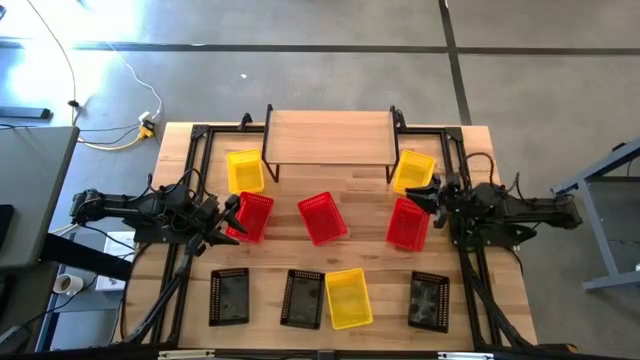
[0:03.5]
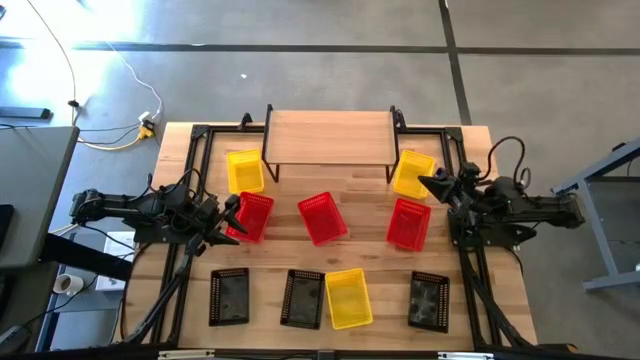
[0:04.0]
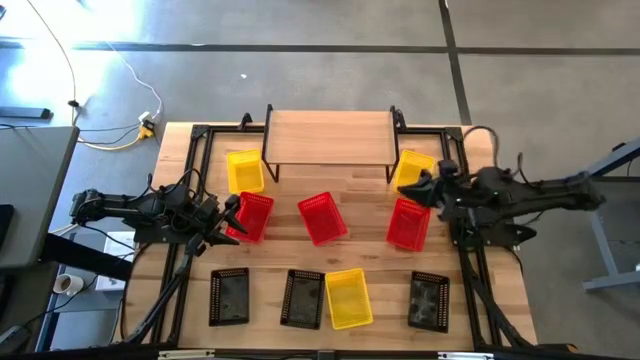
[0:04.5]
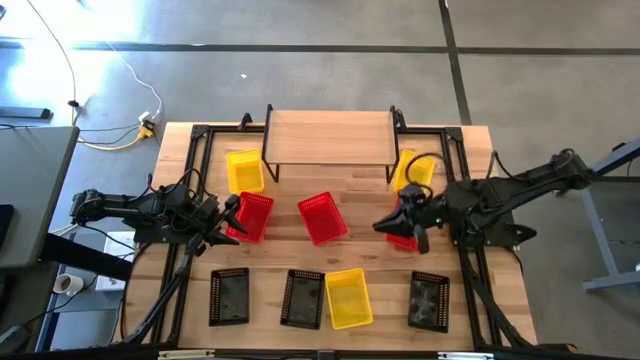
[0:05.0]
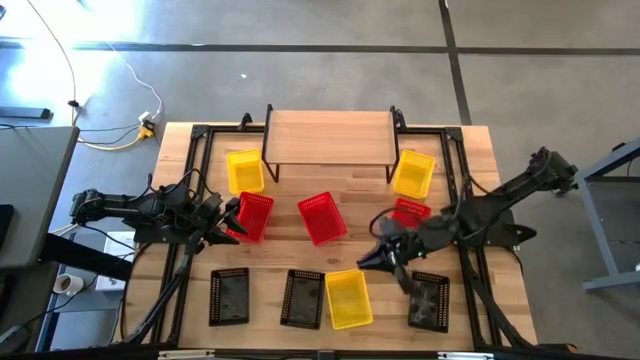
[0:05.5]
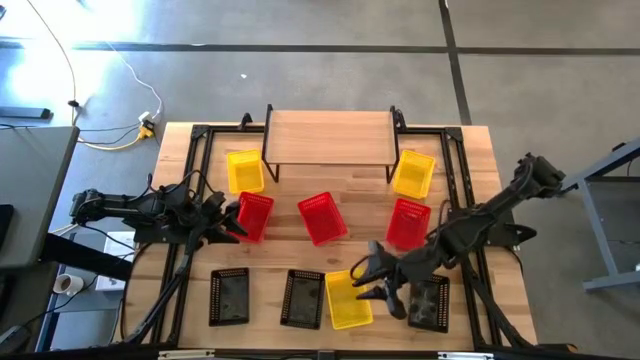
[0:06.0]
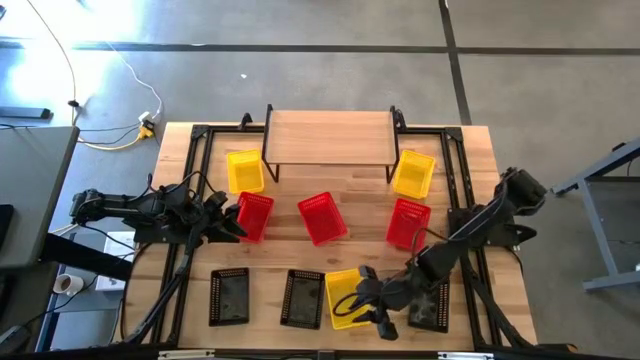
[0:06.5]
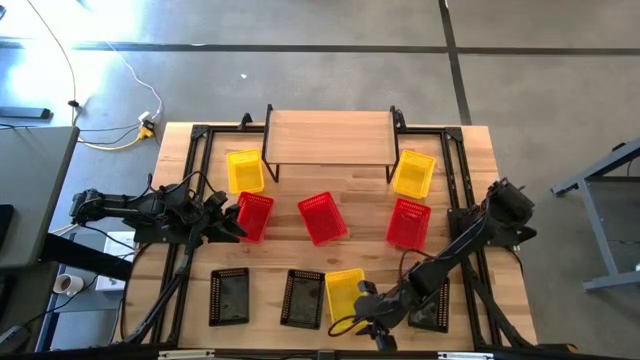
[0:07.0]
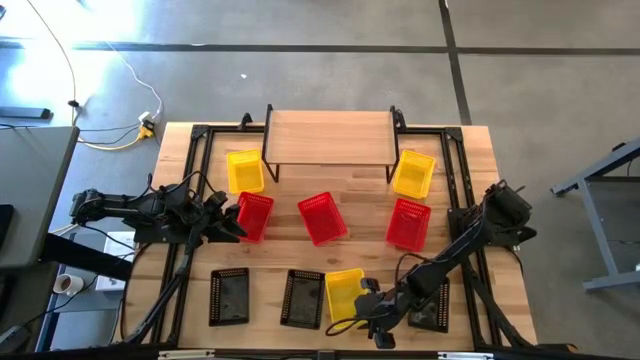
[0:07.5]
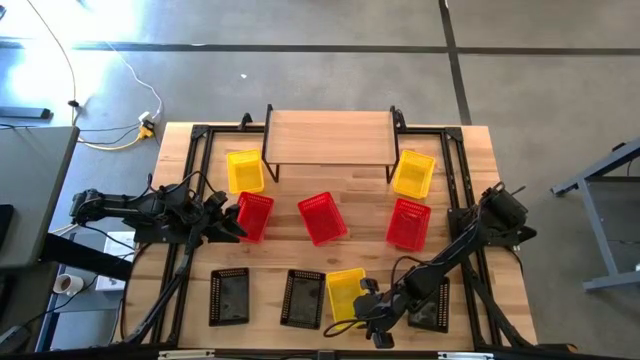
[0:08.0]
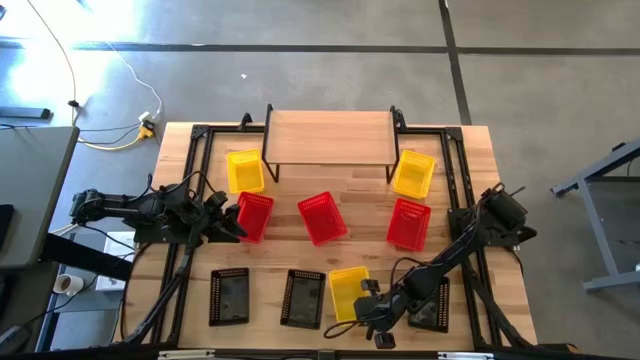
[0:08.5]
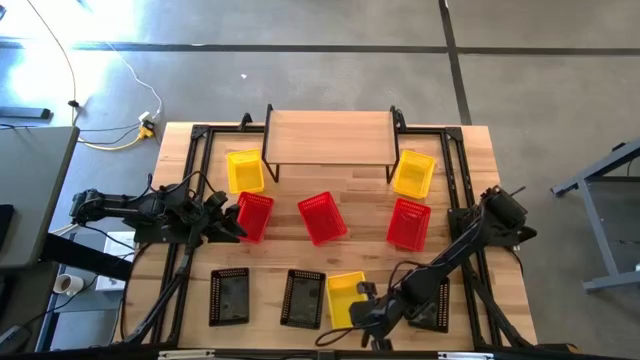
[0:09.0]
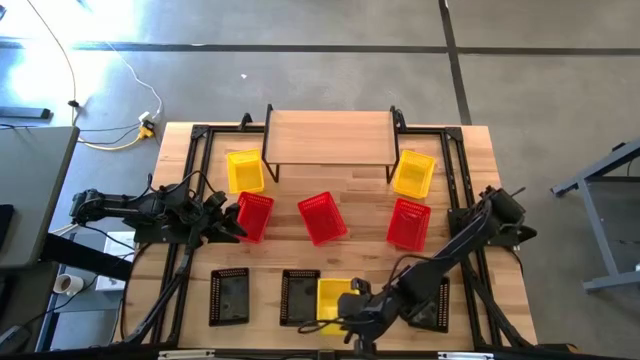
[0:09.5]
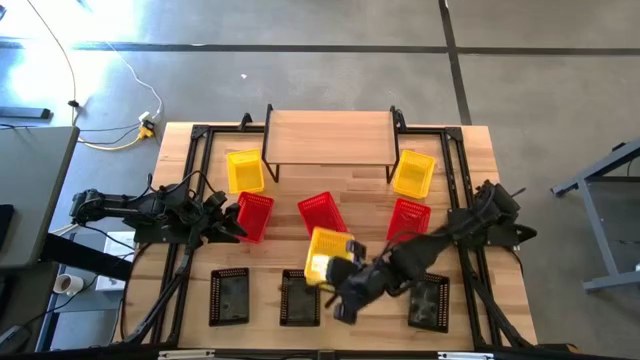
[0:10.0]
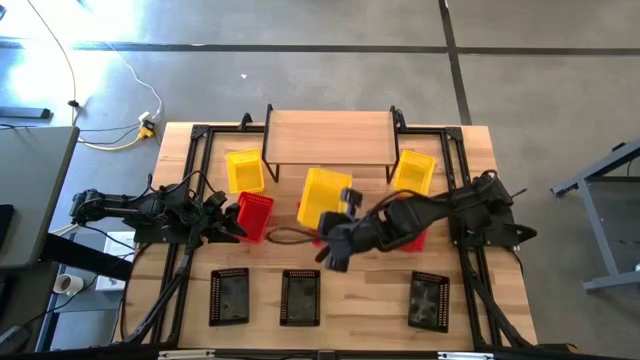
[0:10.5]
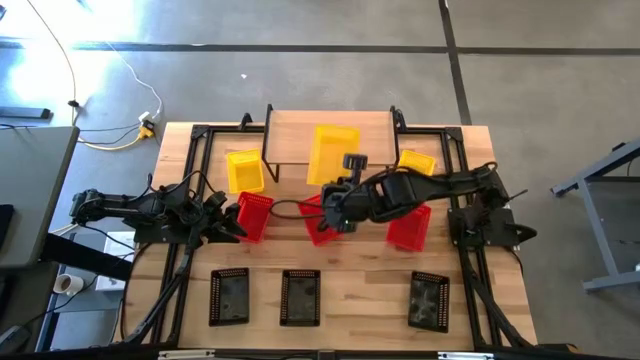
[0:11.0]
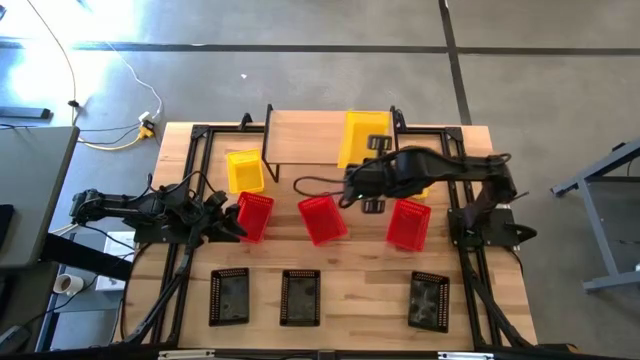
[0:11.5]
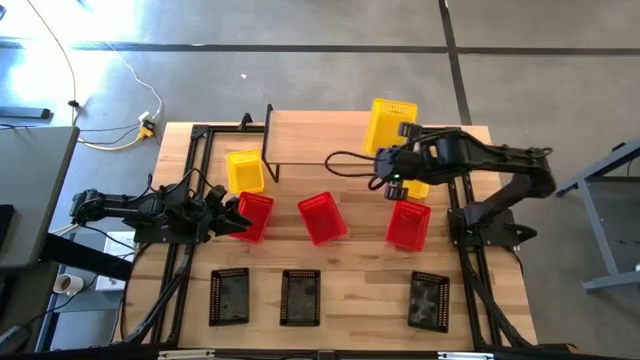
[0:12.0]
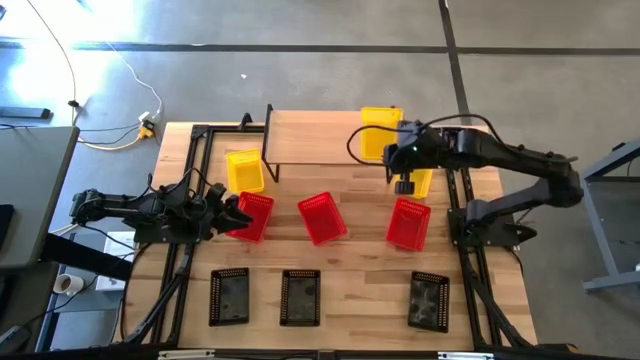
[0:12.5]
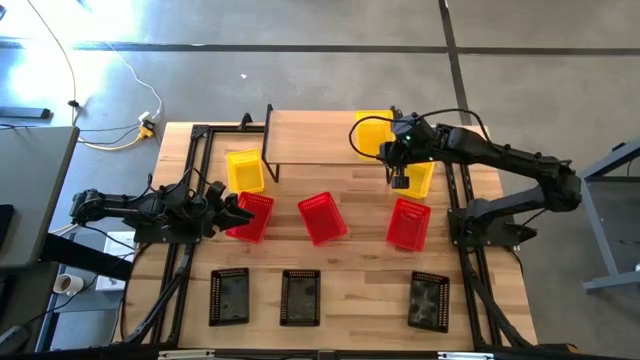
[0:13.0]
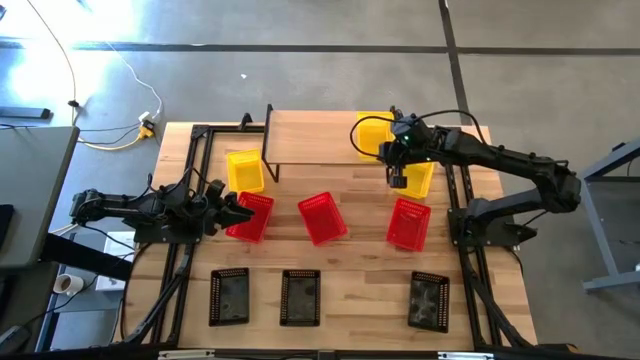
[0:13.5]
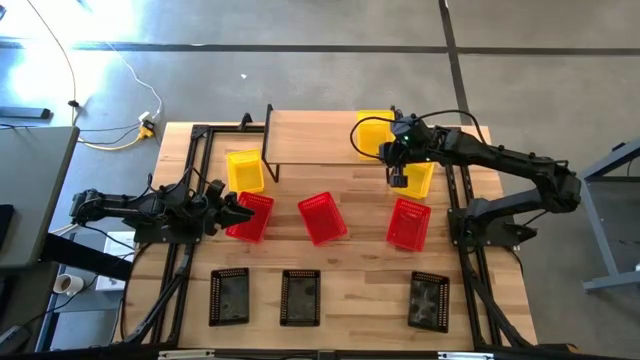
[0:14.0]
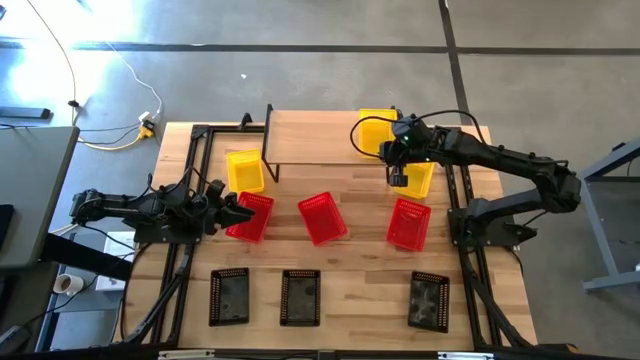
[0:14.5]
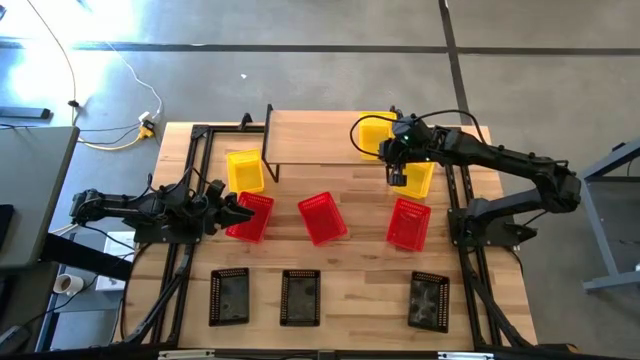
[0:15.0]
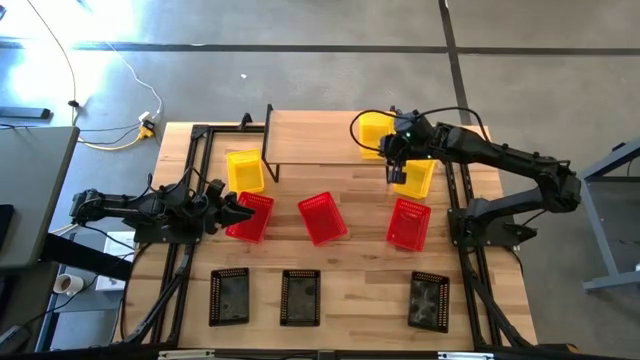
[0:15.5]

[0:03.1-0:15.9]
Task: Stack baskets on shelf by color
Put the bottom yellow bin on the shelf

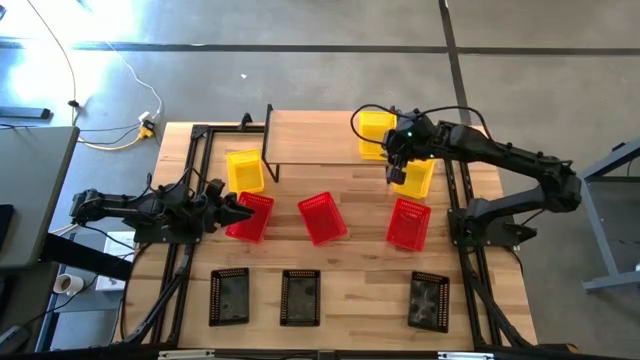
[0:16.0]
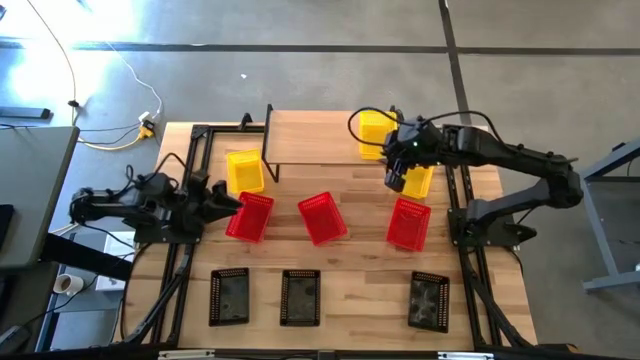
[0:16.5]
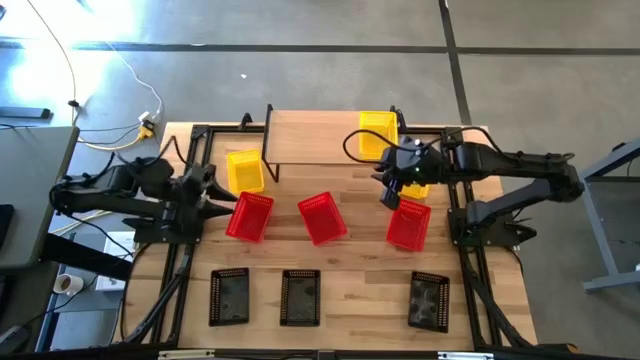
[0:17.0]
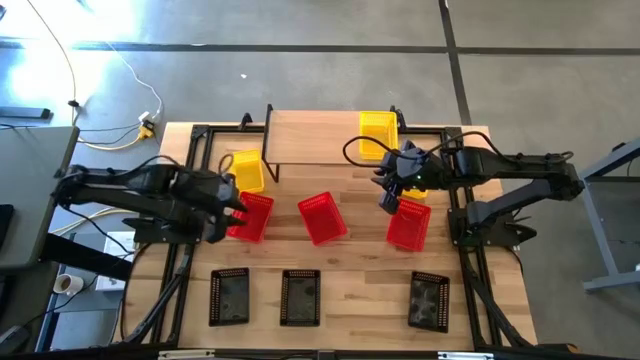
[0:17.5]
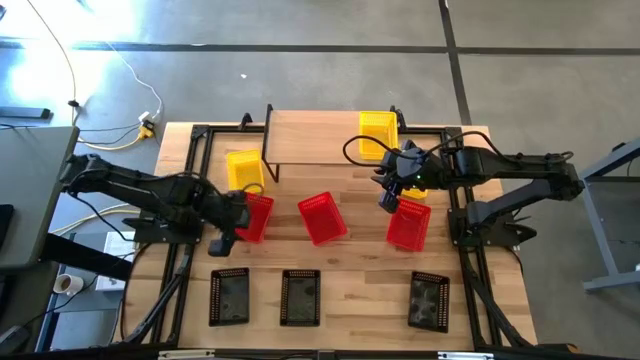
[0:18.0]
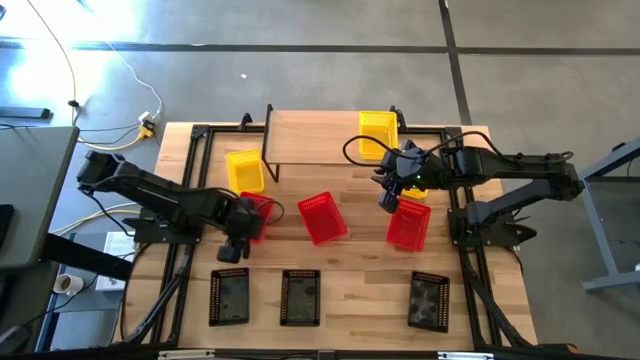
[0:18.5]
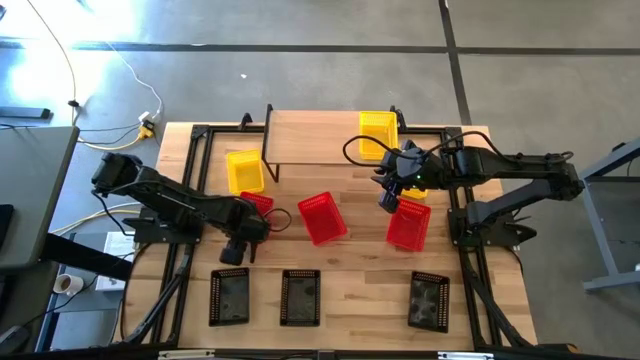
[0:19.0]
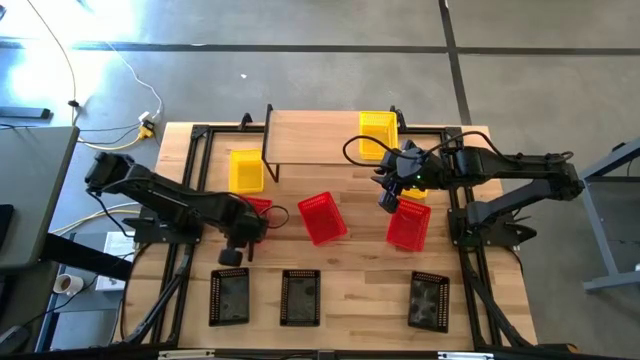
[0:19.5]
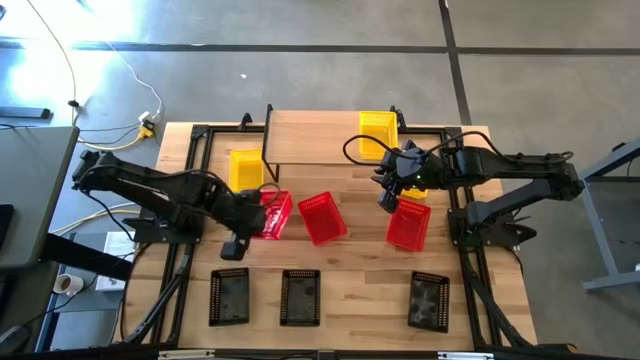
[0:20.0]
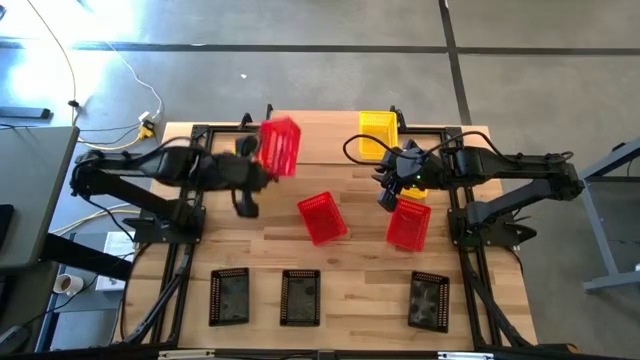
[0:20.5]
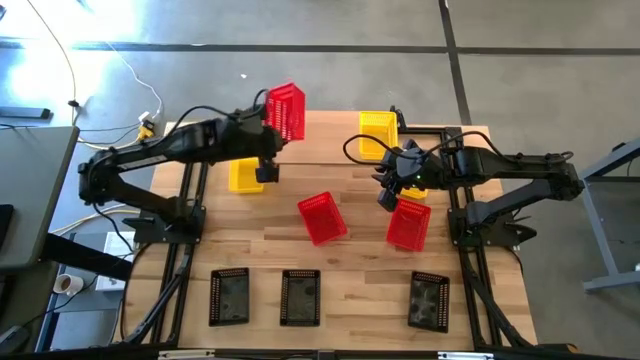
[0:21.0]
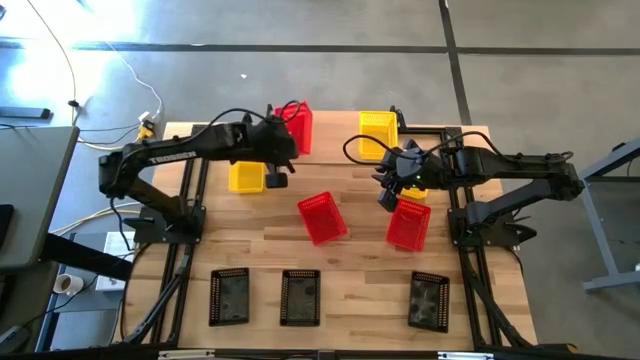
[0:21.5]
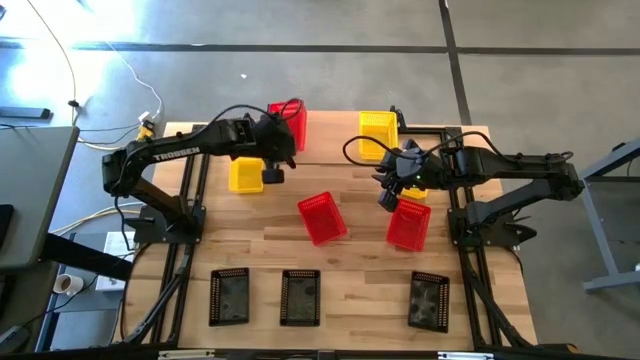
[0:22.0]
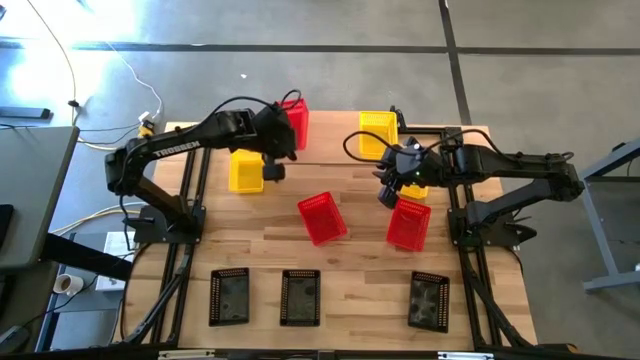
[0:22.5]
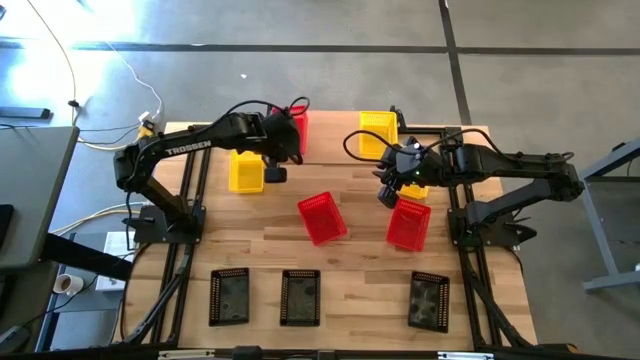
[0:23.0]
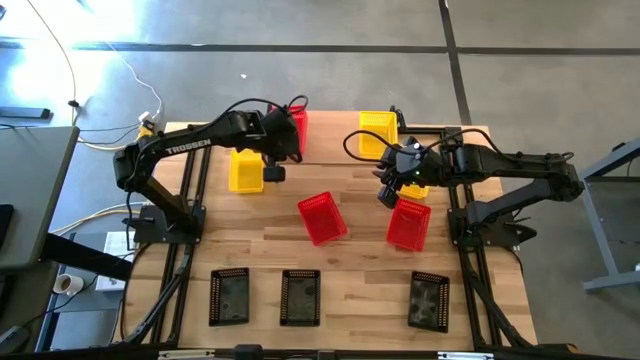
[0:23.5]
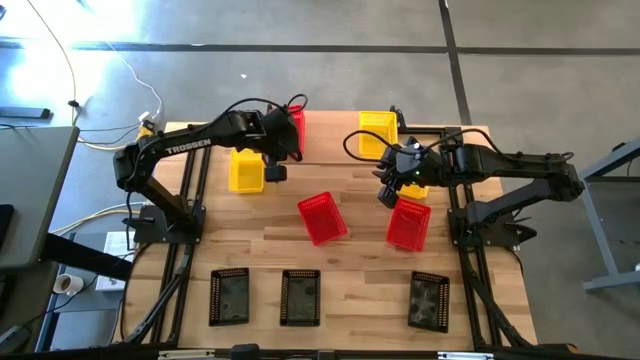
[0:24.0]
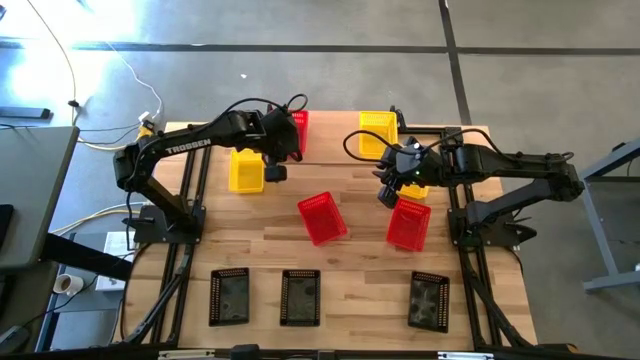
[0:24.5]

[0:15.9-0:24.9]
Put the left red bin on the shelf
